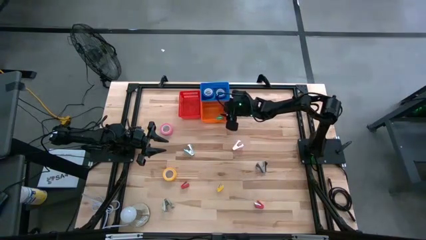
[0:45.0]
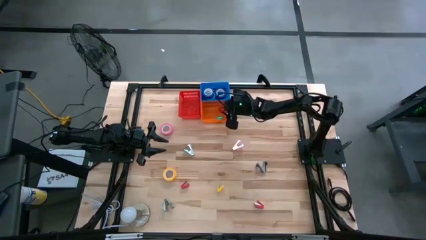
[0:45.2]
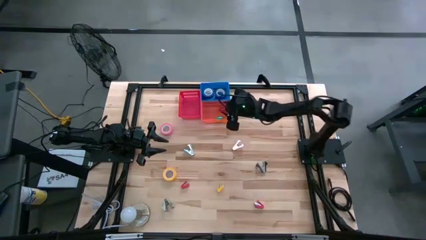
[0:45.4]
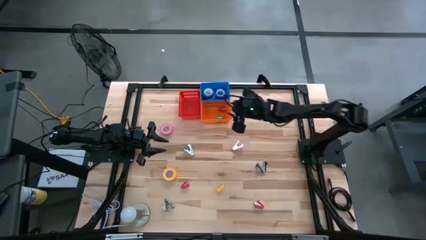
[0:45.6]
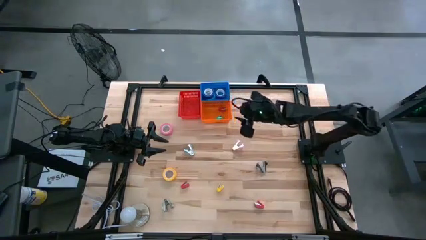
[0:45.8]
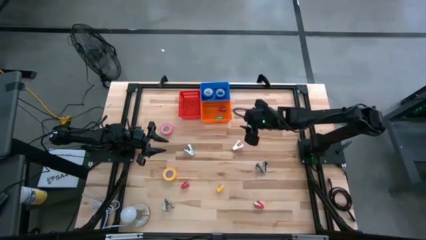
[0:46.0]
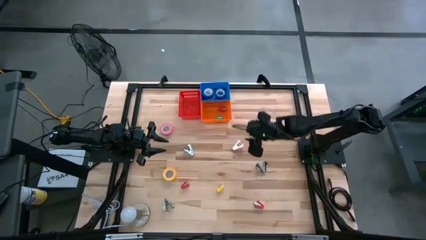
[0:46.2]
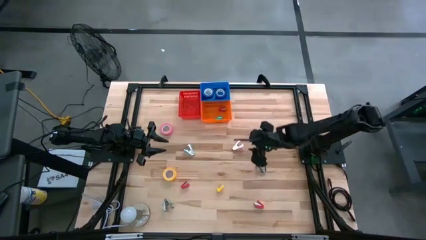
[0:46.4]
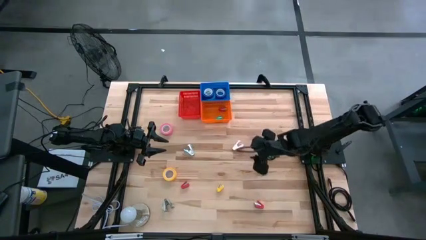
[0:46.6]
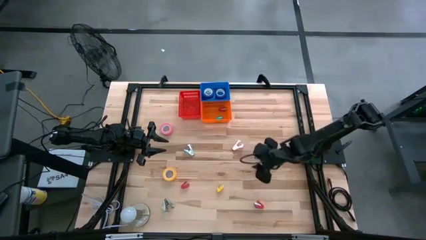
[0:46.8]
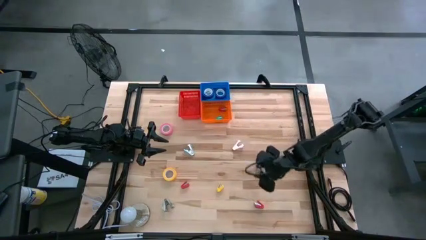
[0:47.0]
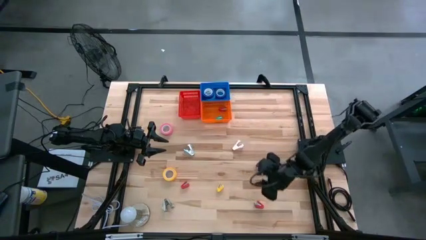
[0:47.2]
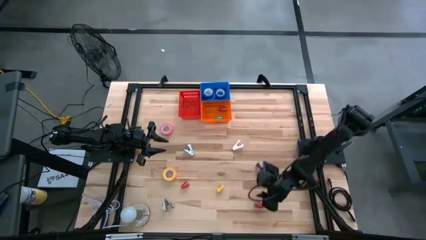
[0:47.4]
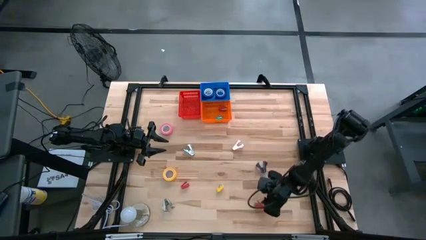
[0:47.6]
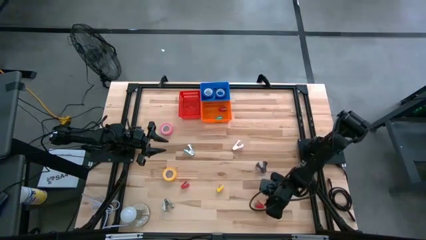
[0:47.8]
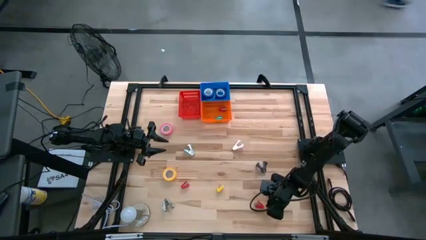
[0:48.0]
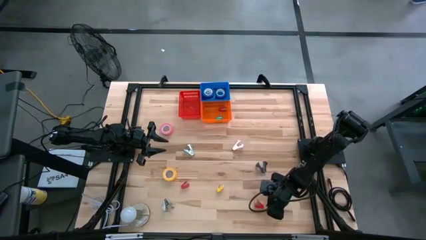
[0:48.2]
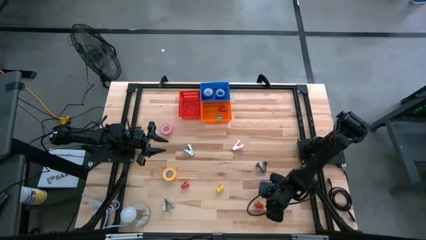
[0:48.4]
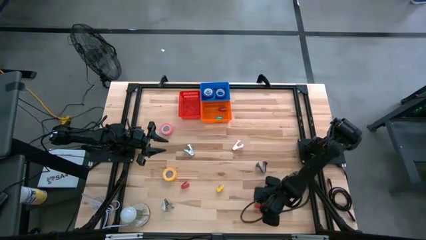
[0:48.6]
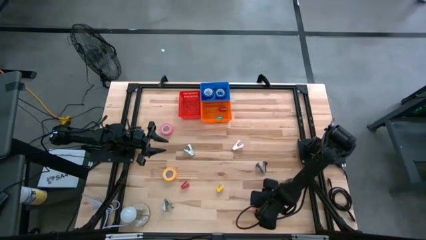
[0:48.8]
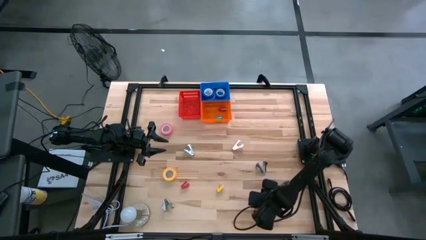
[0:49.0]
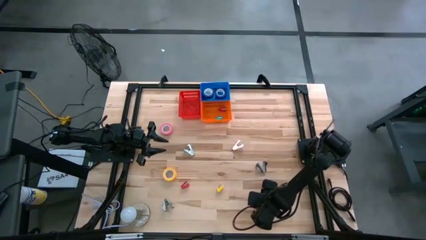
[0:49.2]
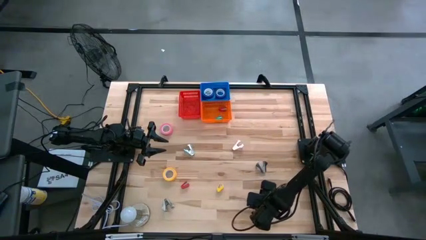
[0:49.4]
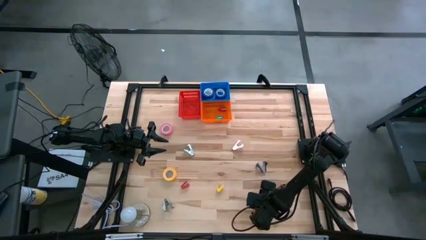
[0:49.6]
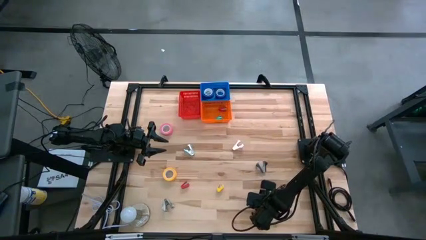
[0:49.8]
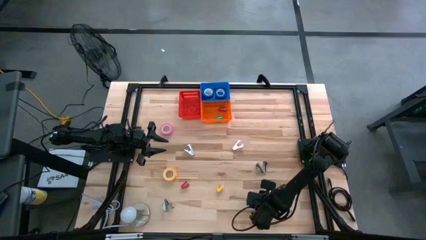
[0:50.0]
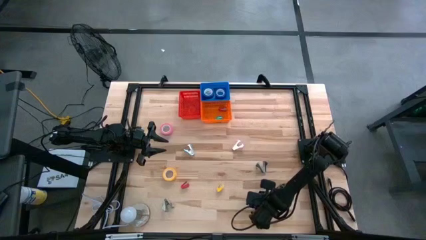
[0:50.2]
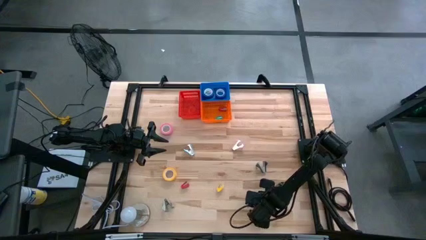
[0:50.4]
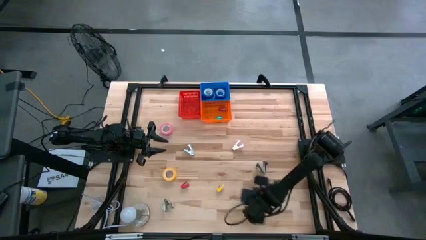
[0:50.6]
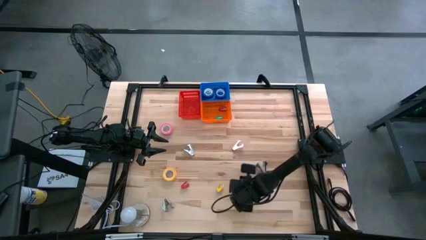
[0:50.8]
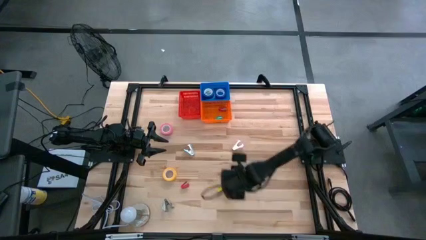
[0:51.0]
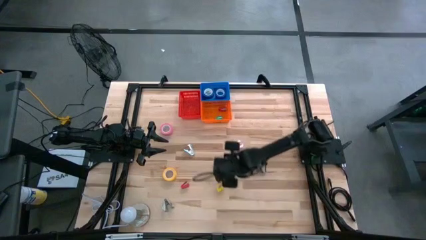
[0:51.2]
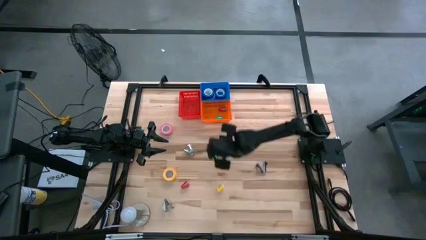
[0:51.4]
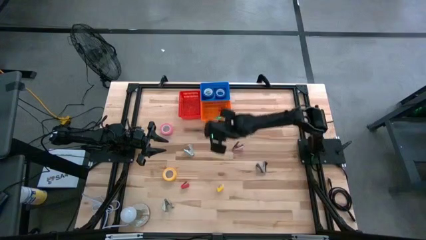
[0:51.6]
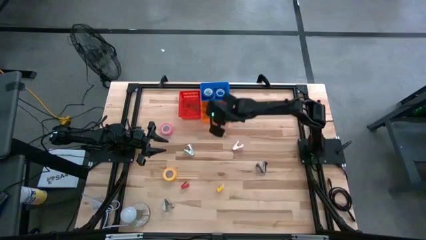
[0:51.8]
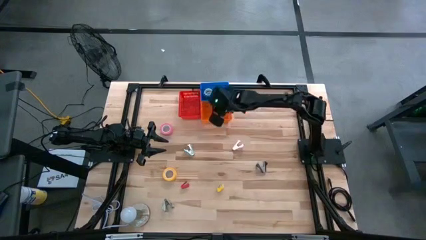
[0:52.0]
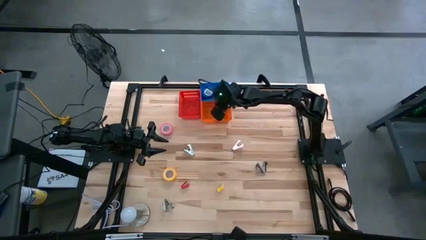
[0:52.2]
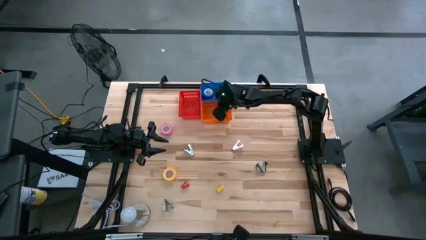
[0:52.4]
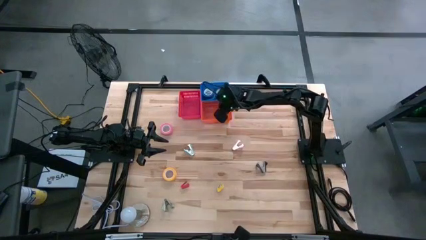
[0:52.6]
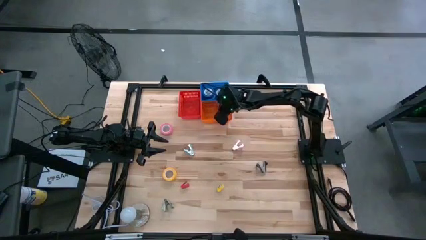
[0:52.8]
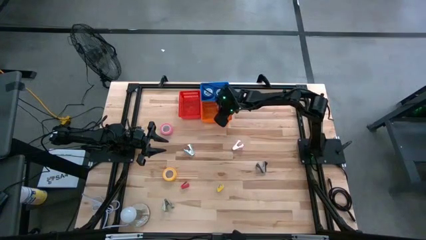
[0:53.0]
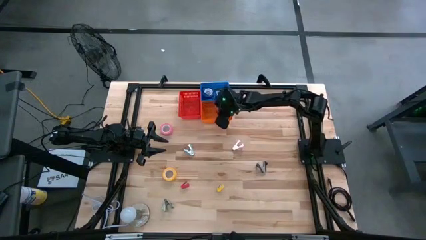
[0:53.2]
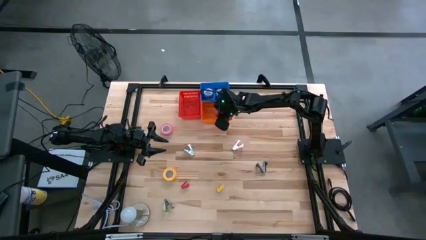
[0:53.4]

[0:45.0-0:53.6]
Task: Pick and place Stapler, Stapler remover, tape
Put the right red stapler into the orange bin

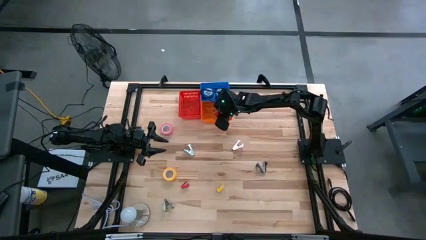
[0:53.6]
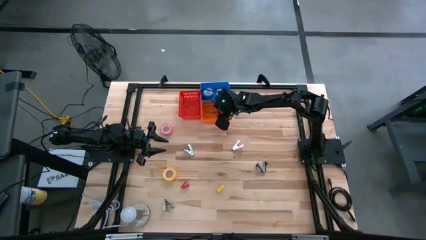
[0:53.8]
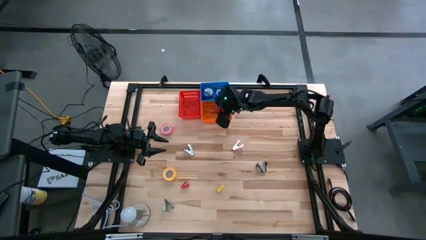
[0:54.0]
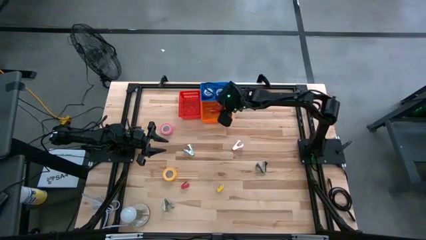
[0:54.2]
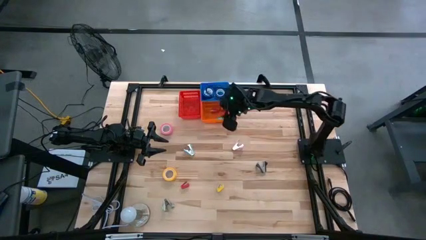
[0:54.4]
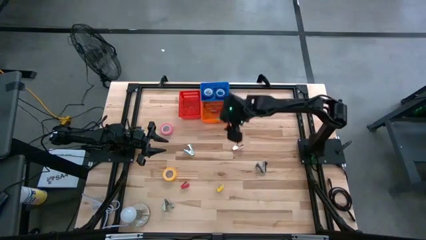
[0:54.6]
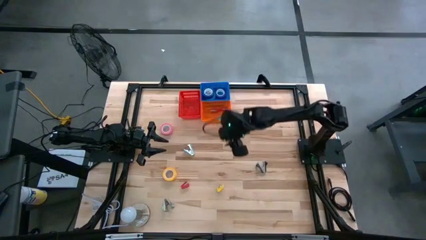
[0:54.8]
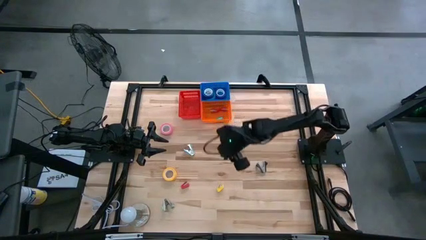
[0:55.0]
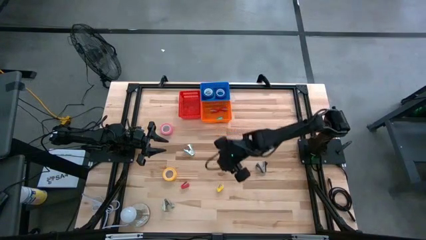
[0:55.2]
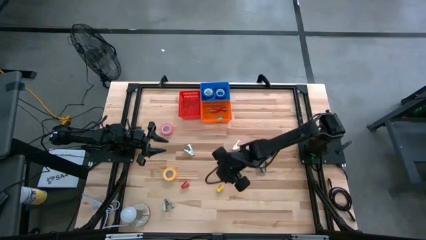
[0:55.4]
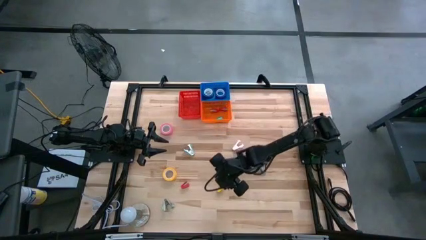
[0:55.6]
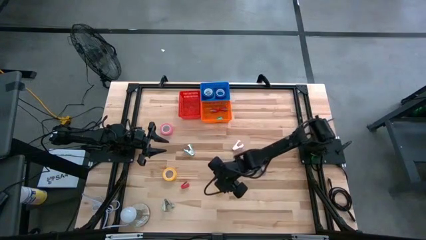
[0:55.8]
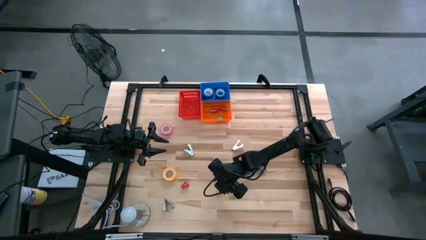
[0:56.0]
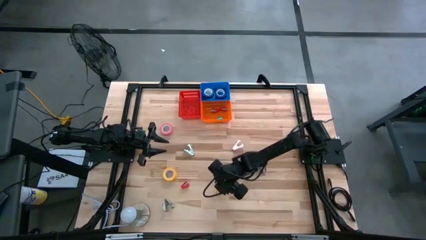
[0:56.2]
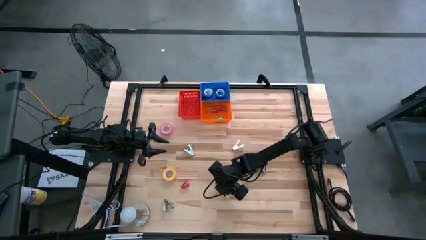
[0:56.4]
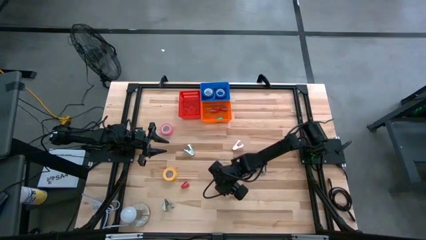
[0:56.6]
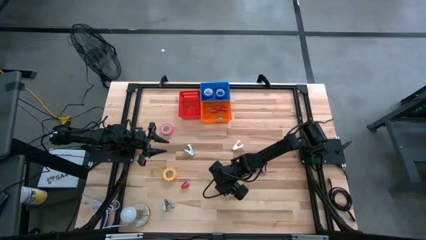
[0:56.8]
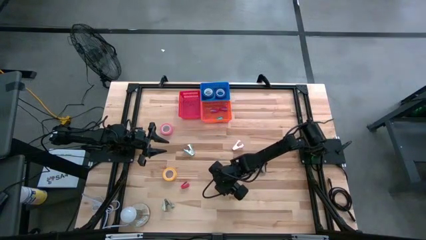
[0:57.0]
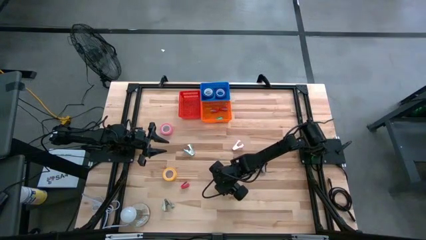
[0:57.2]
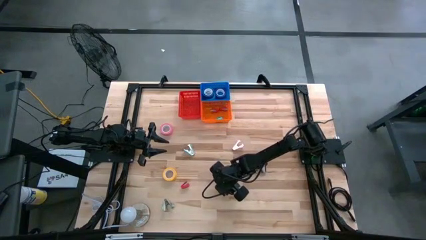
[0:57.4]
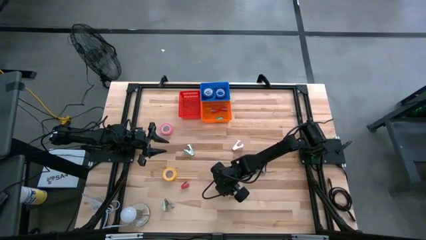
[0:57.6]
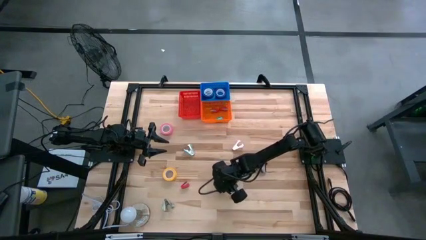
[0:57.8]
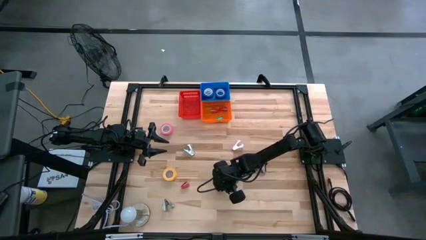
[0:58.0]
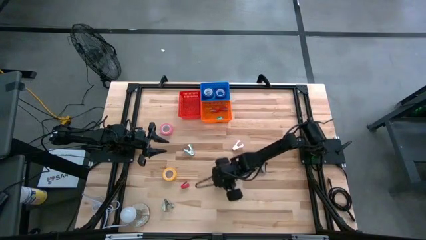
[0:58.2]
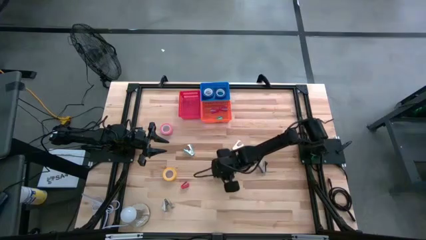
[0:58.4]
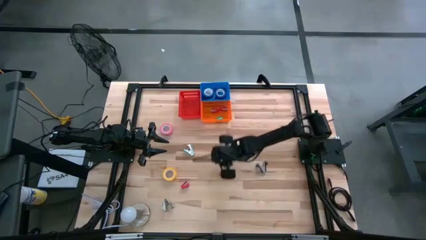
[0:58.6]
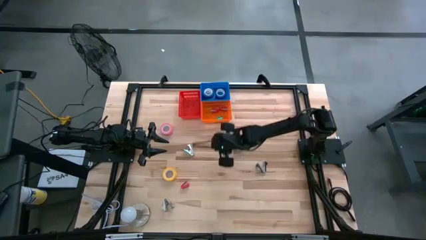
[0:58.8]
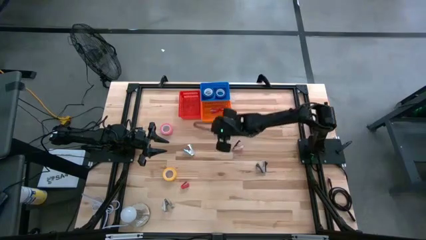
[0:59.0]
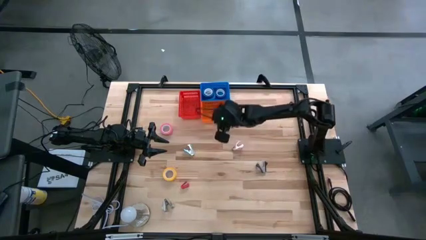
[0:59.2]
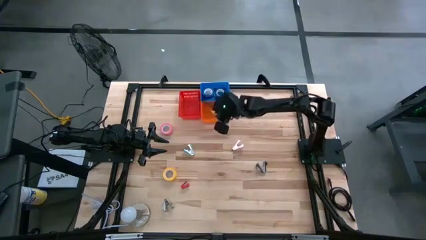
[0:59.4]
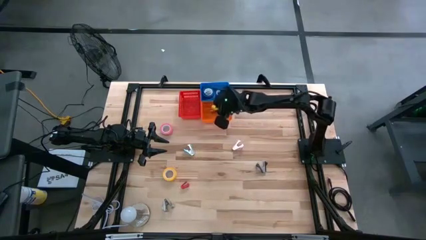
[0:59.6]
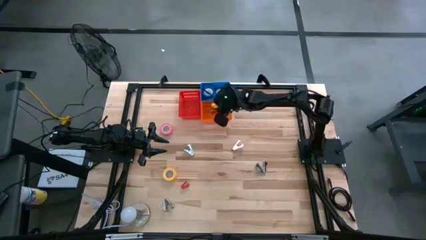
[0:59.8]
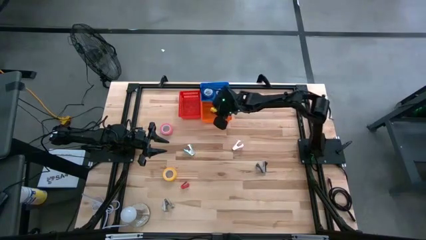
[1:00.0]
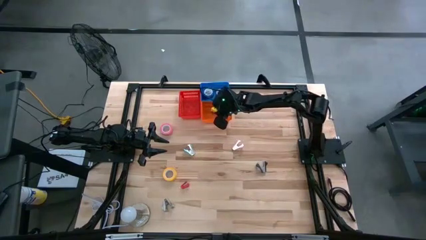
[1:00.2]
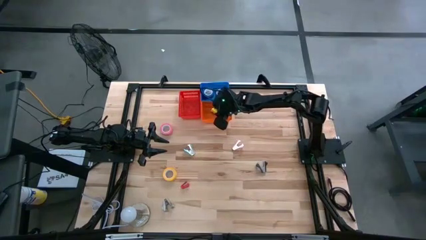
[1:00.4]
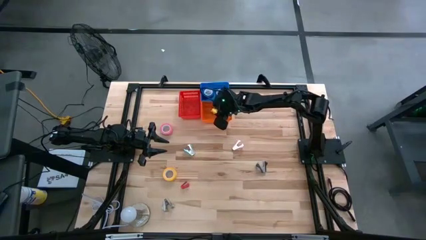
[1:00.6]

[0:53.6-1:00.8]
Put the yellow stapler into the orange bin
